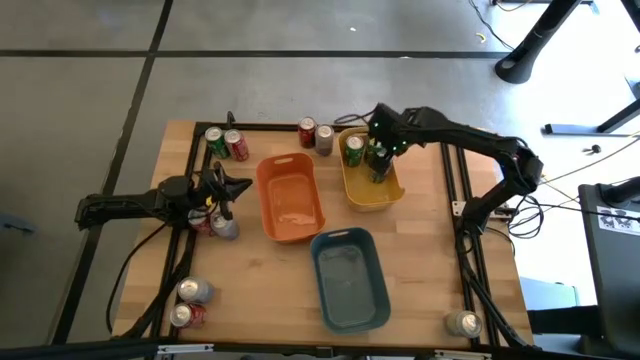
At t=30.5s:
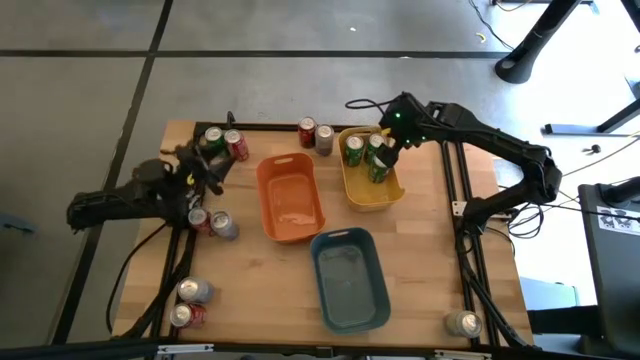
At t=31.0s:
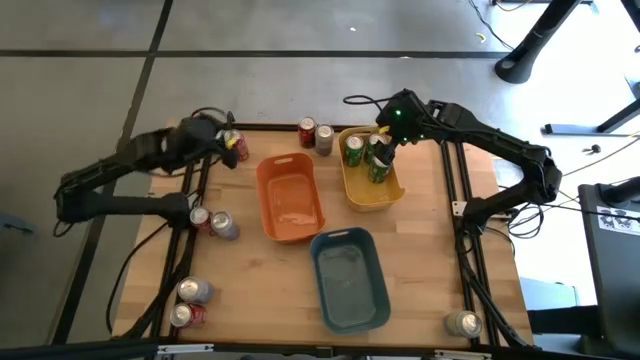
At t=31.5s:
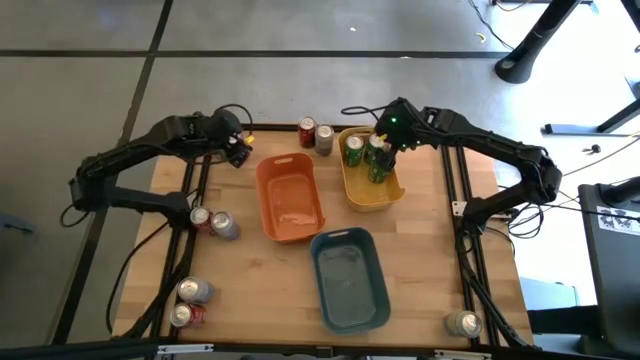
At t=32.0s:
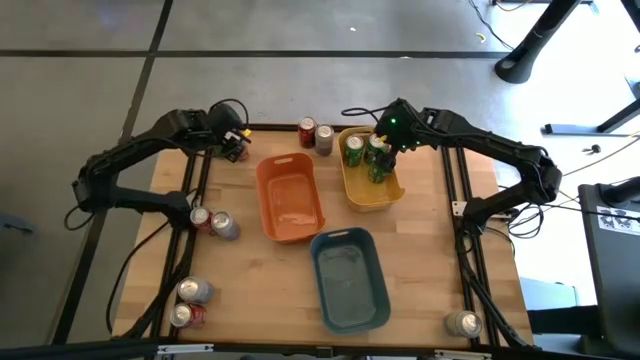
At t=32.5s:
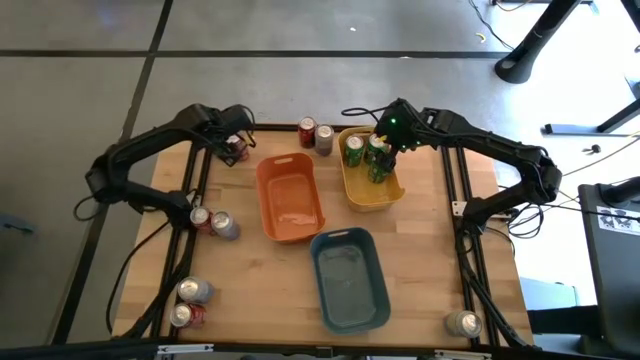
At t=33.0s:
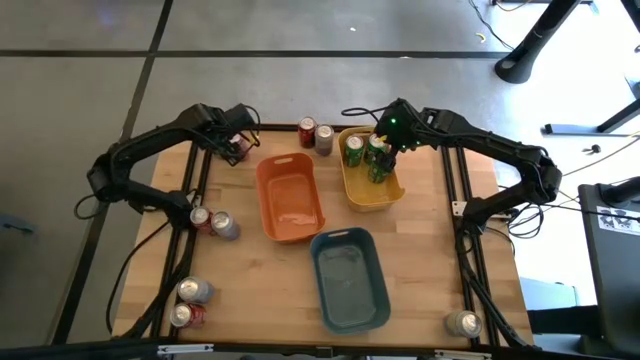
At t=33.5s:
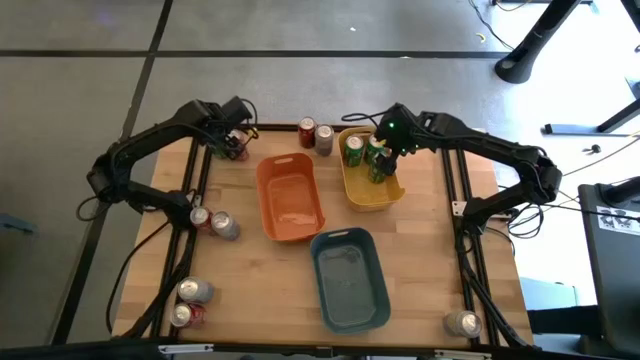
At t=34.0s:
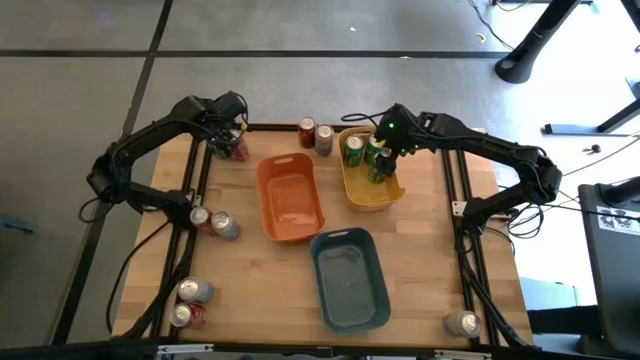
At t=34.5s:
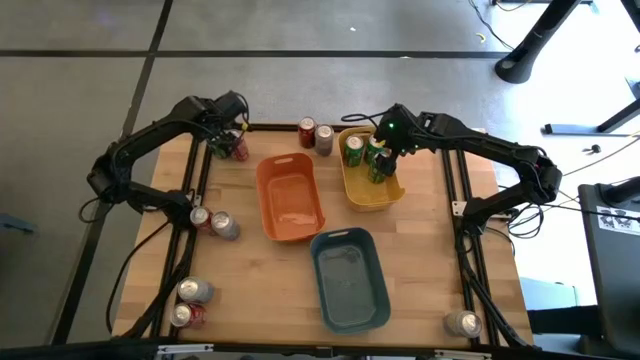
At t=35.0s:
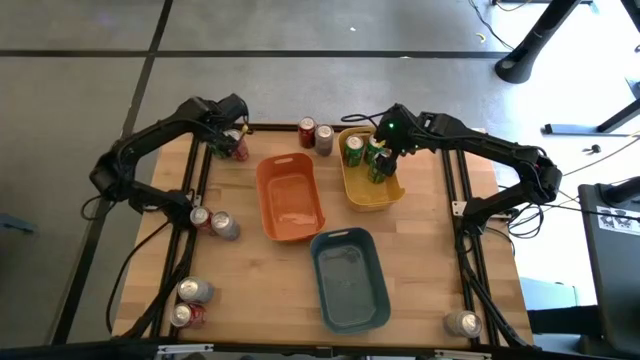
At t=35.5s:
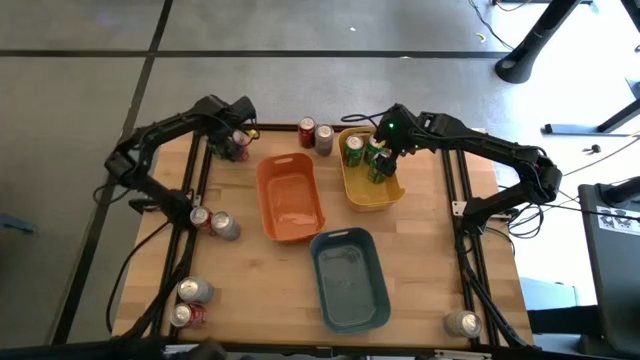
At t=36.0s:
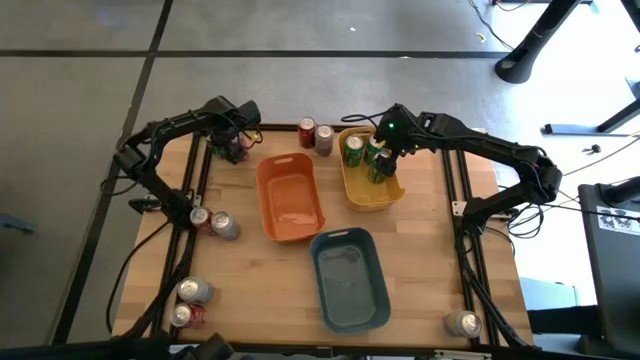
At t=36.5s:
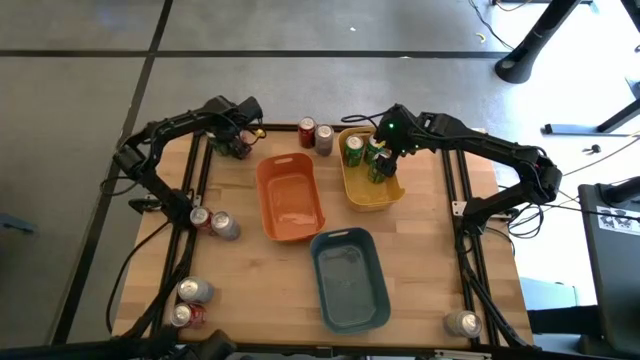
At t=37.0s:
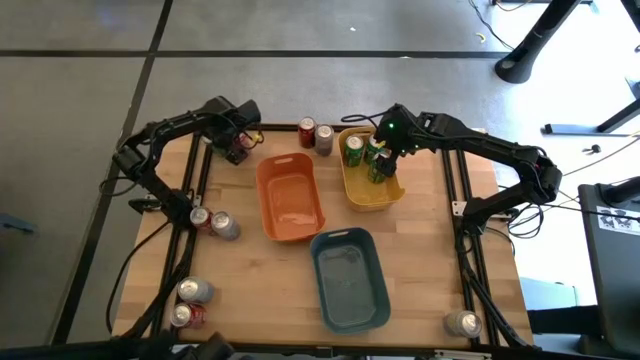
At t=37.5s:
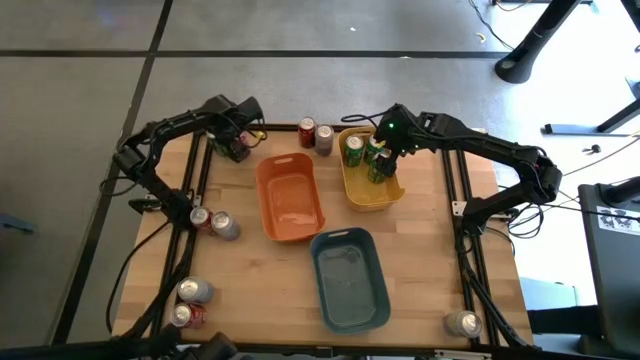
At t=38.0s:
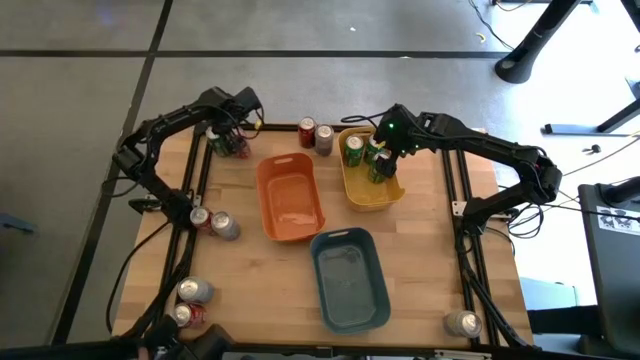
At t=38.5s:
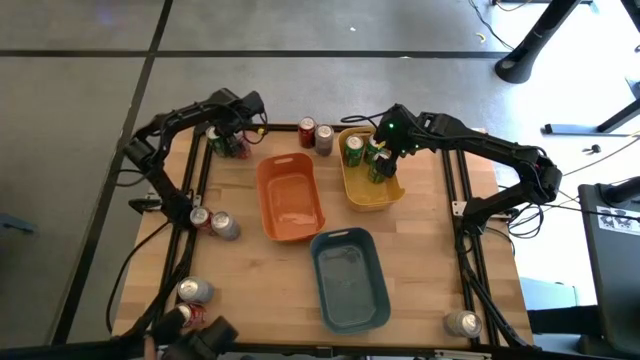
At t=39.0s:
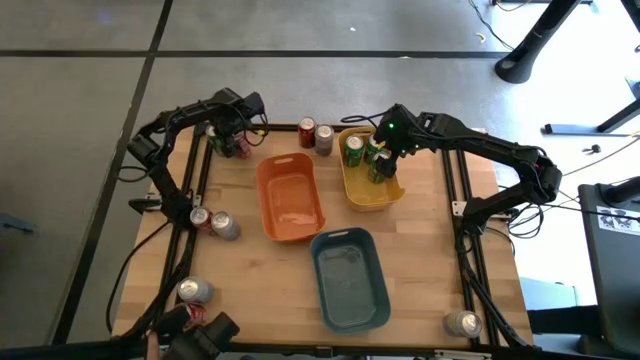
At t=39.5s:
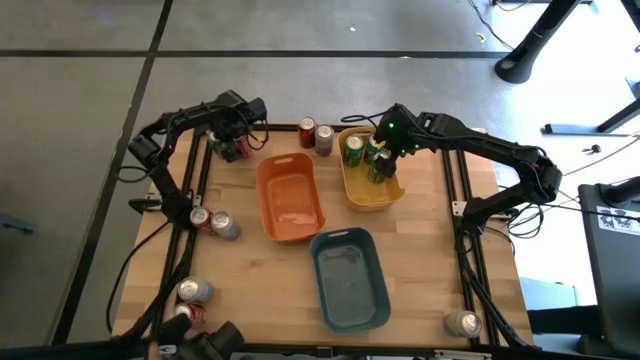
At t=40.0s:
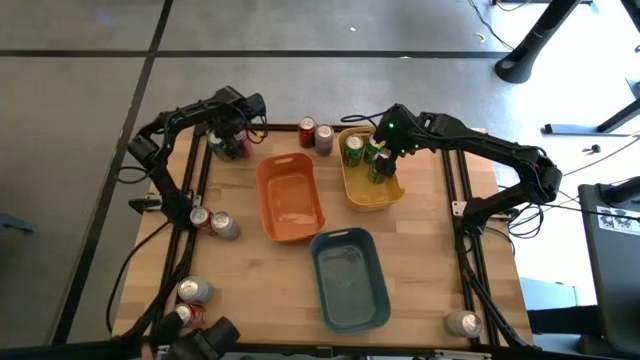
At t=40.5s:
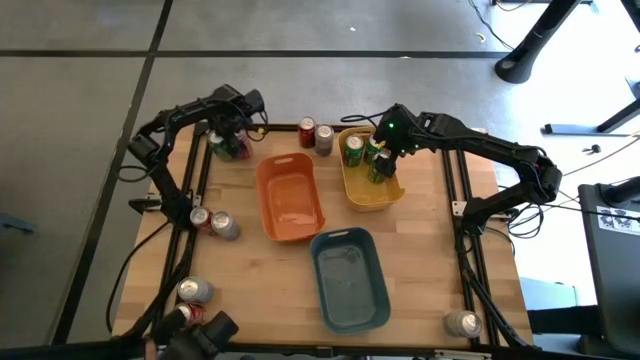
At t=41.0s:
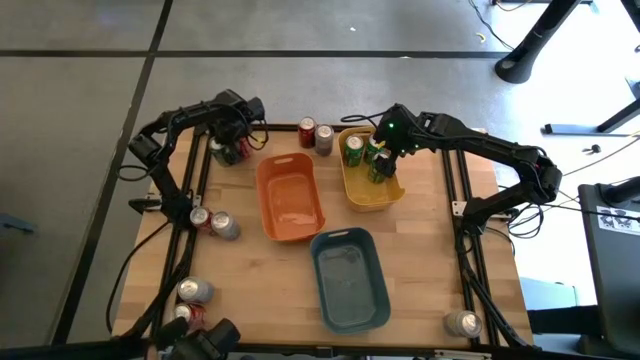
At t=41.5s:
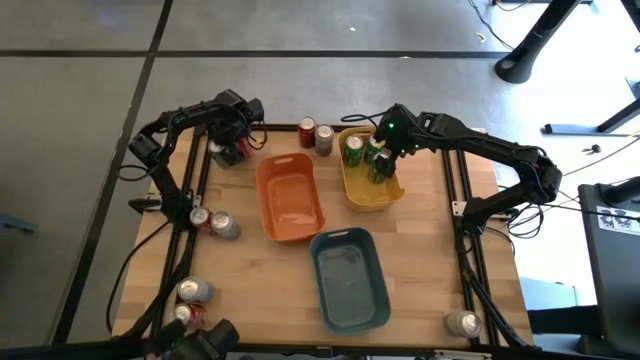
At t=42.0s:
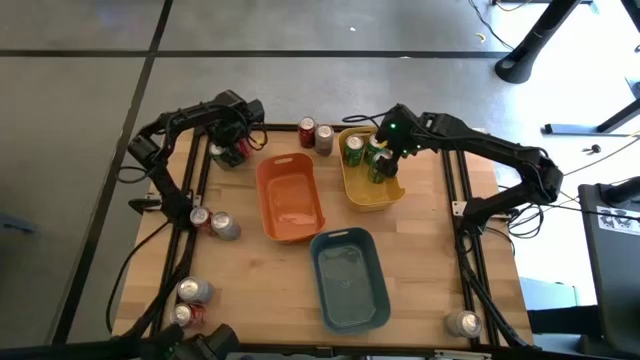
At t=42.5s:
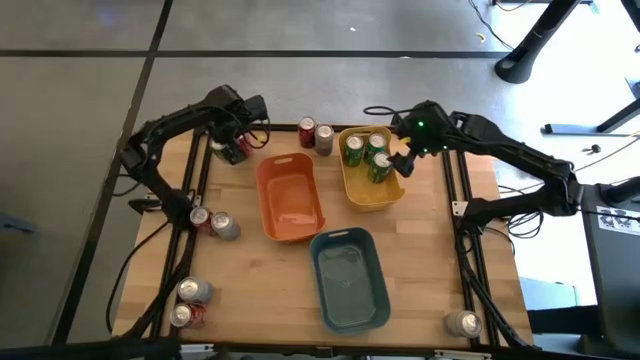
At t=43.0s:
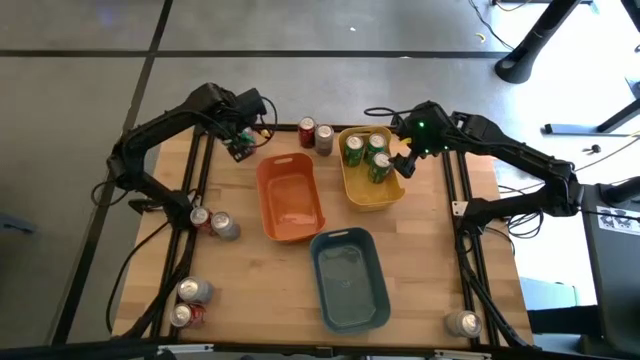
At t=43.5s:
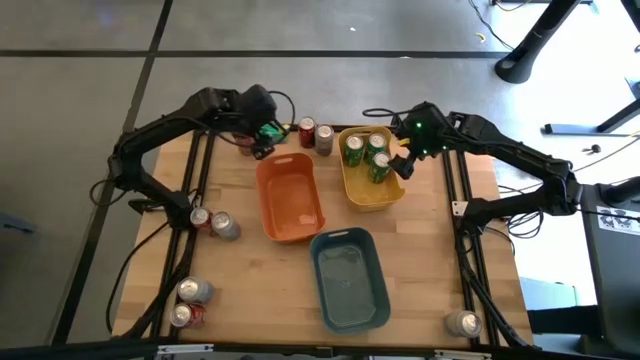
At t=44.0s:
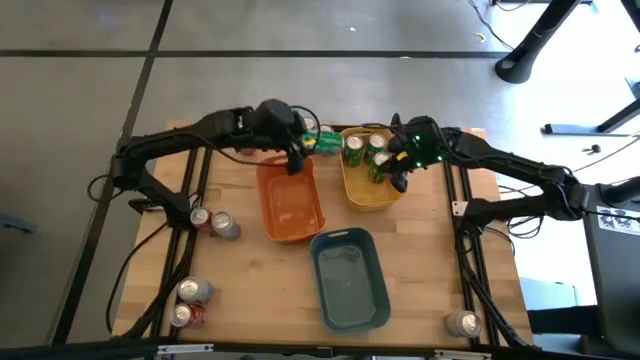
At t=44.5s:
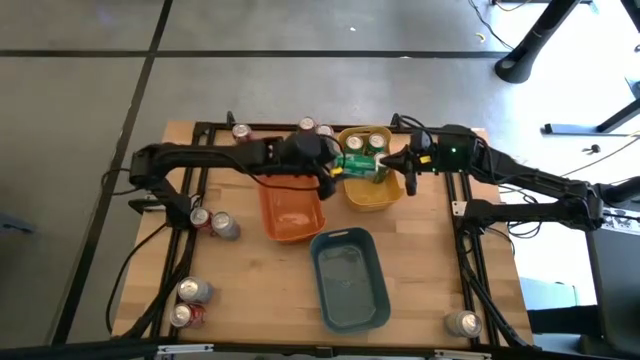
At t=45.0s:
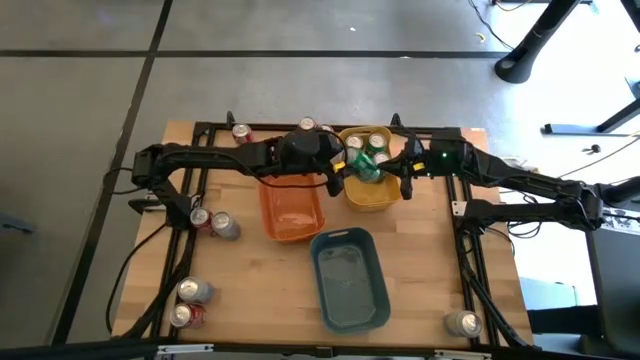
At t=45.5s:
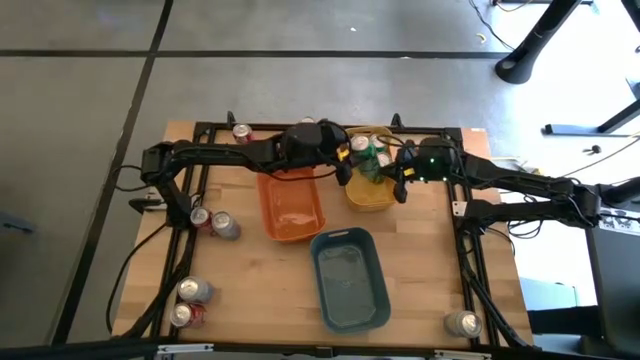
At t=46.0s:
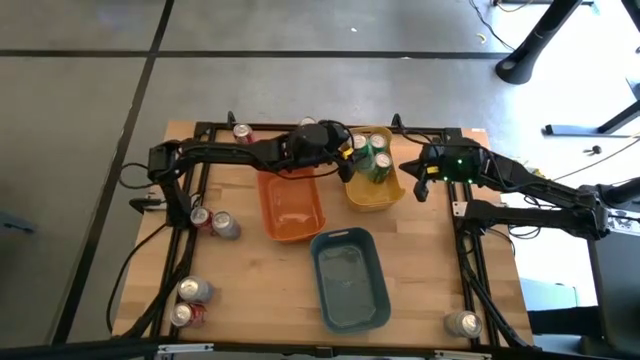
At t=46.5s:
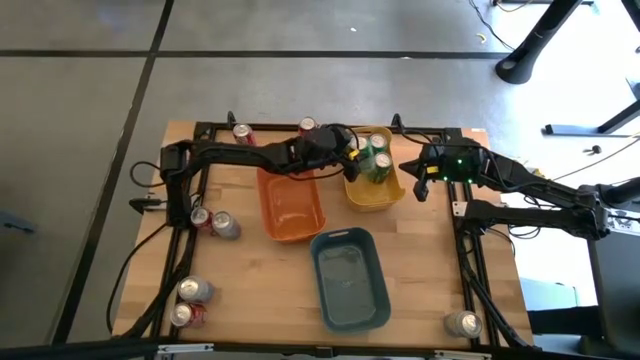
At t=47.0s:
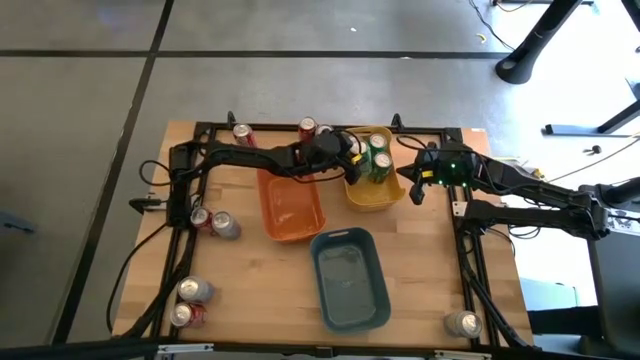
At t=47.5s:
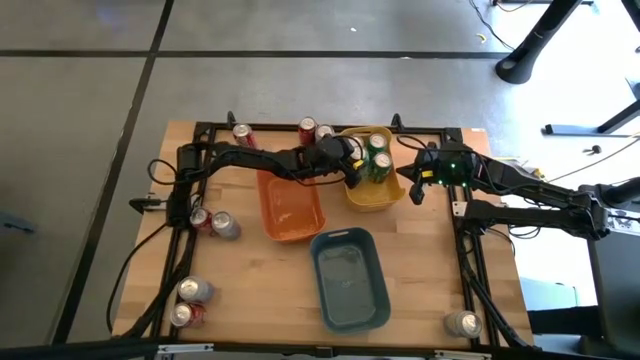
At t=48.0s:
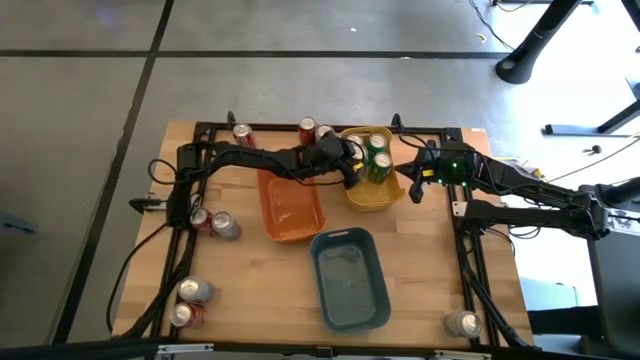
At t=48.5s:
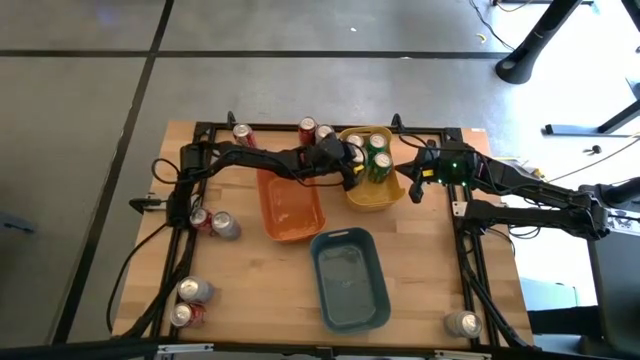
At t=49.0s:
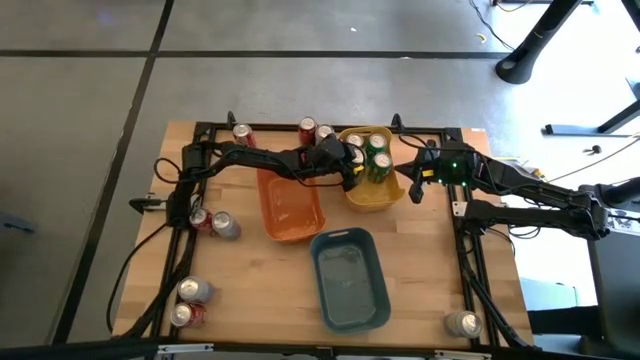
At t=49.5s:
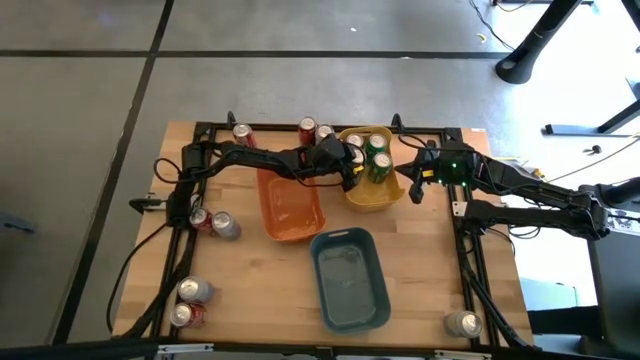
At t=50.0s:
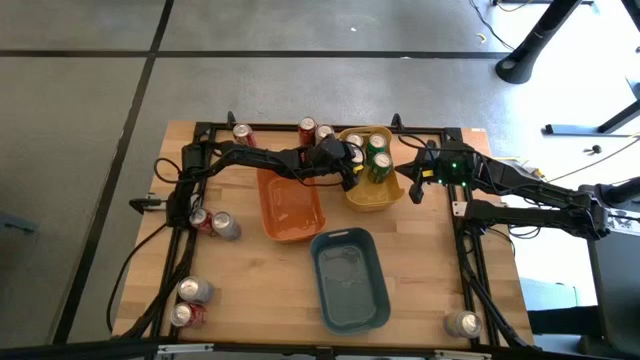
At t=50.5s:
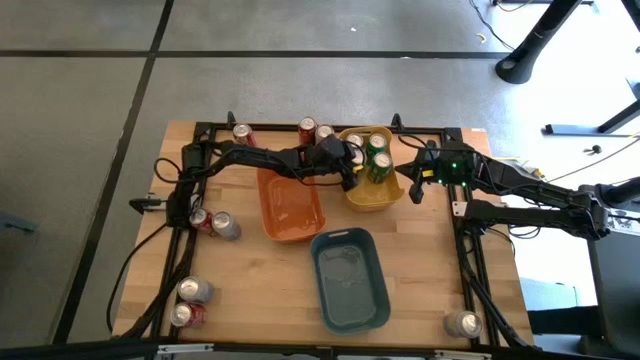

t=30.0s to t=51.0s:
Task: Sort soda cans
Put the green soda can into the yellow bin
